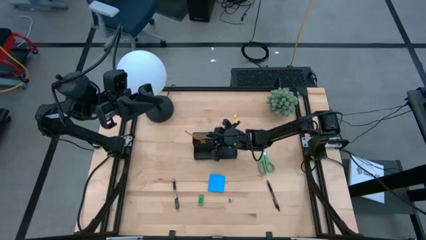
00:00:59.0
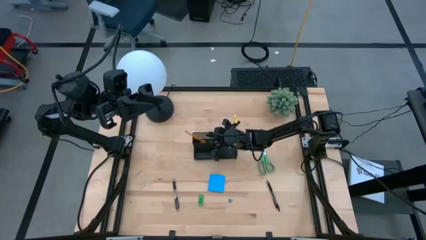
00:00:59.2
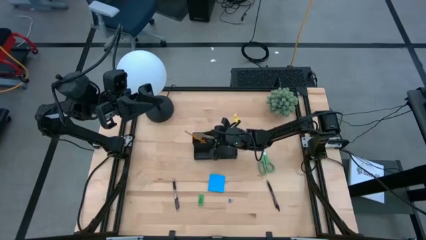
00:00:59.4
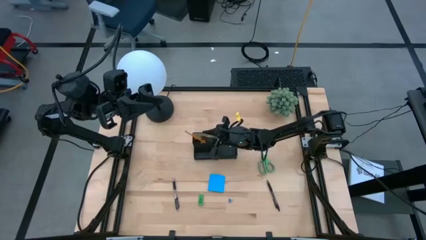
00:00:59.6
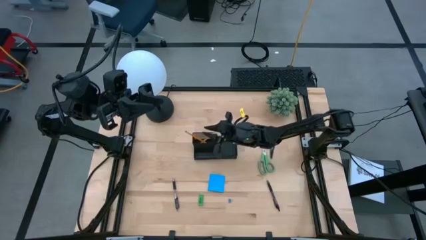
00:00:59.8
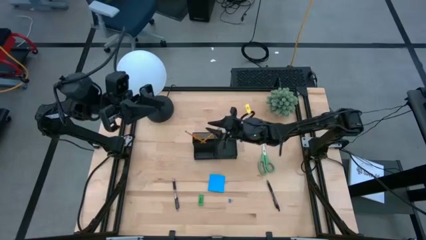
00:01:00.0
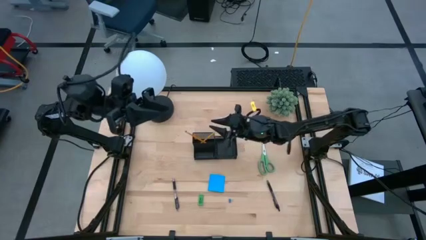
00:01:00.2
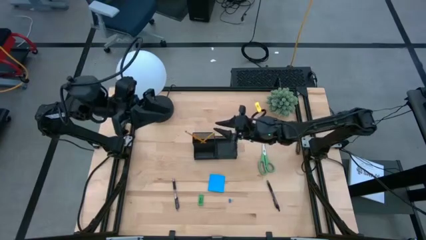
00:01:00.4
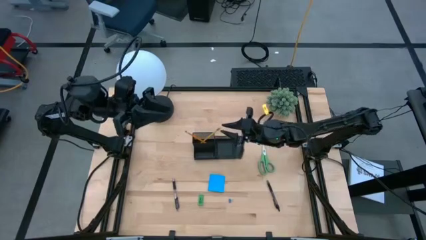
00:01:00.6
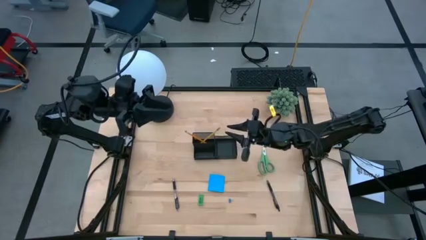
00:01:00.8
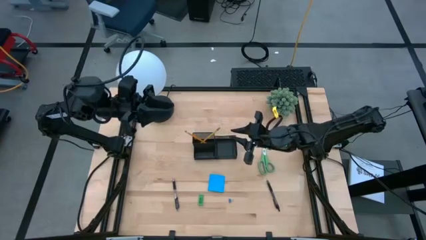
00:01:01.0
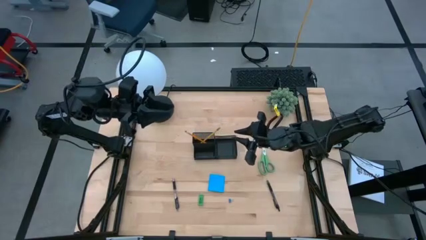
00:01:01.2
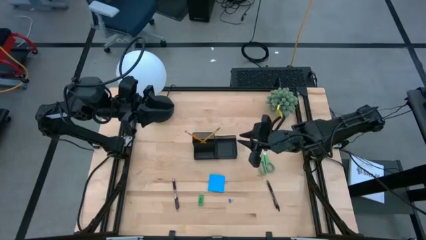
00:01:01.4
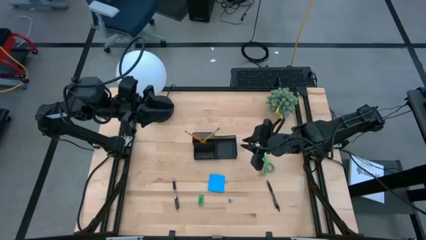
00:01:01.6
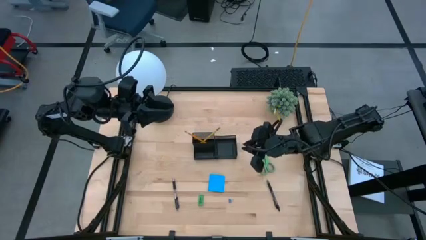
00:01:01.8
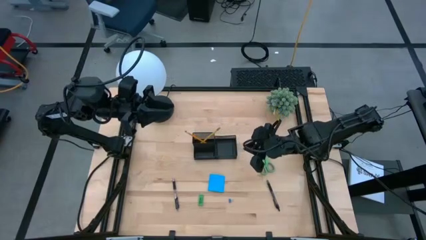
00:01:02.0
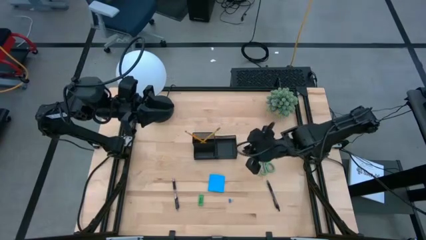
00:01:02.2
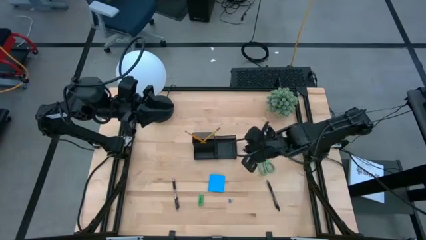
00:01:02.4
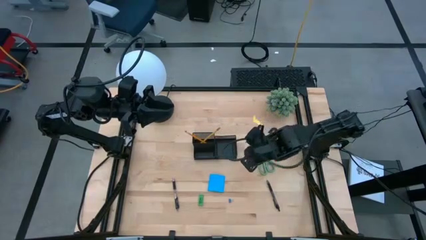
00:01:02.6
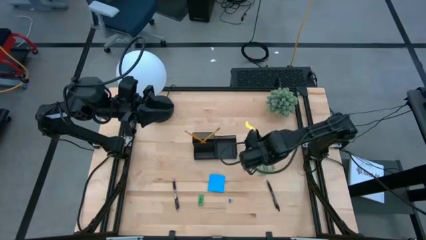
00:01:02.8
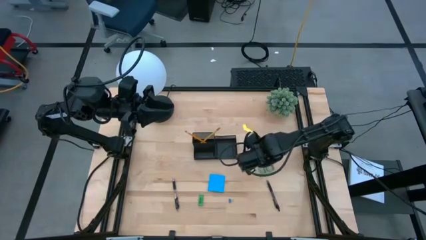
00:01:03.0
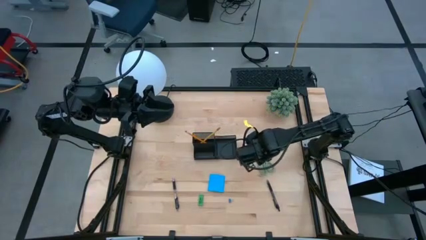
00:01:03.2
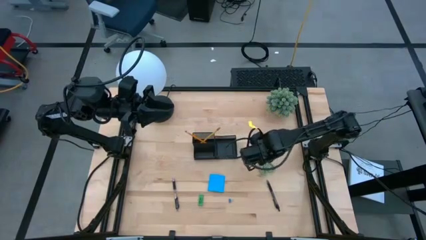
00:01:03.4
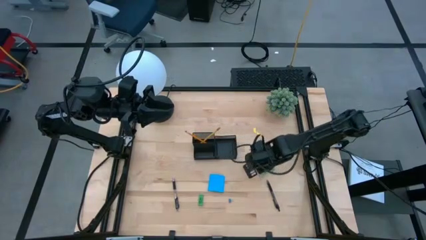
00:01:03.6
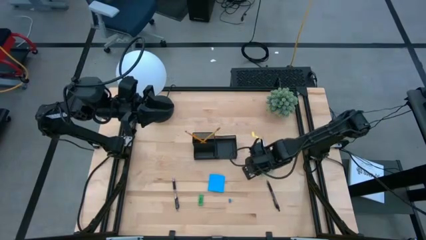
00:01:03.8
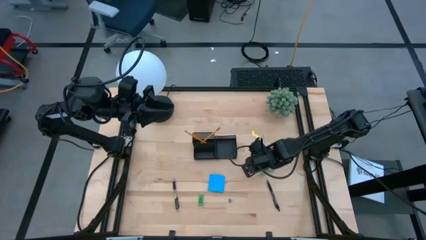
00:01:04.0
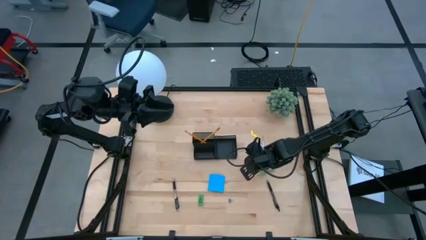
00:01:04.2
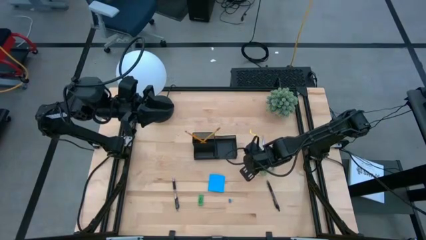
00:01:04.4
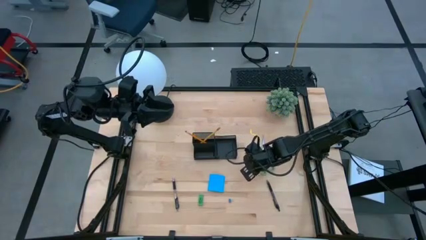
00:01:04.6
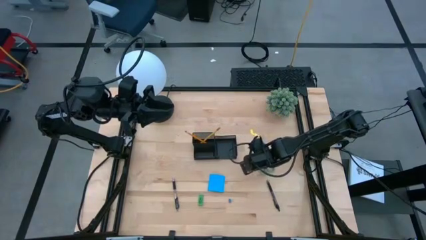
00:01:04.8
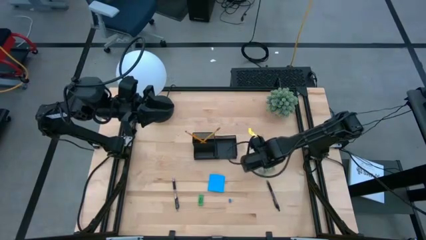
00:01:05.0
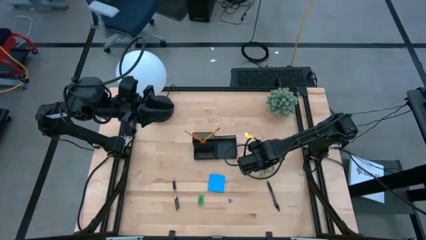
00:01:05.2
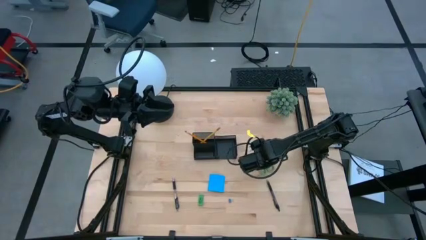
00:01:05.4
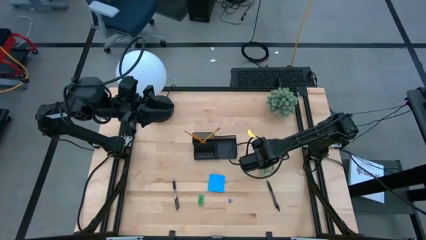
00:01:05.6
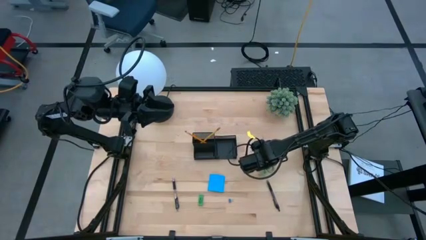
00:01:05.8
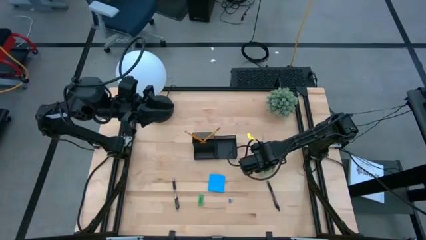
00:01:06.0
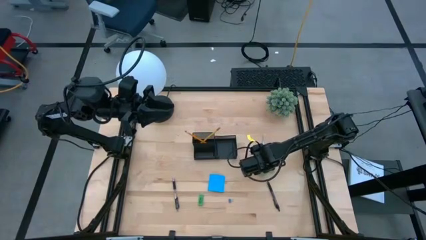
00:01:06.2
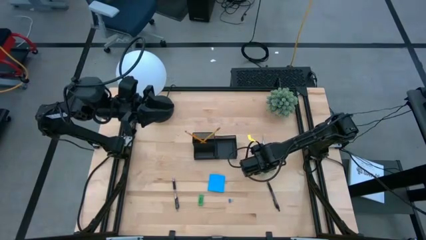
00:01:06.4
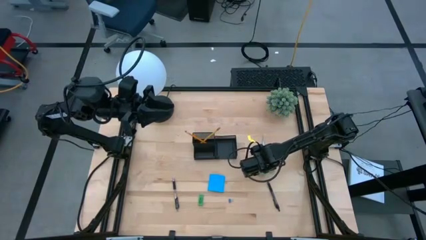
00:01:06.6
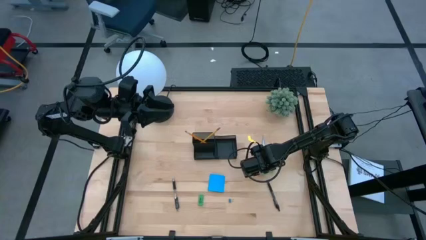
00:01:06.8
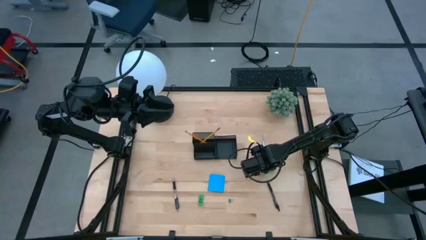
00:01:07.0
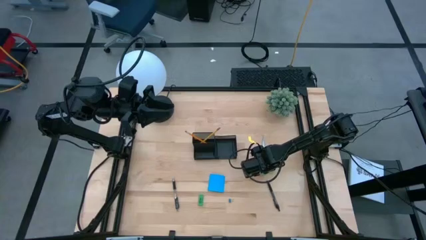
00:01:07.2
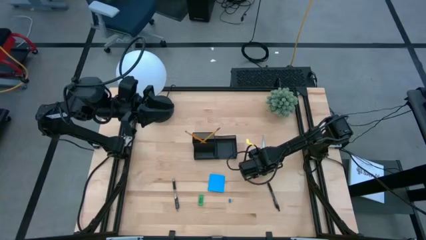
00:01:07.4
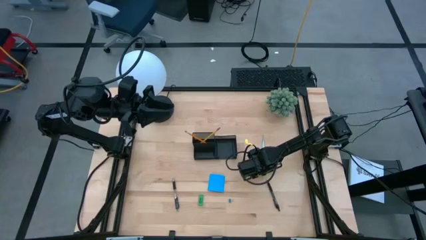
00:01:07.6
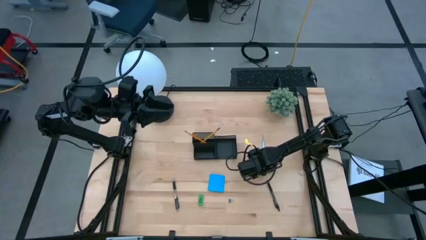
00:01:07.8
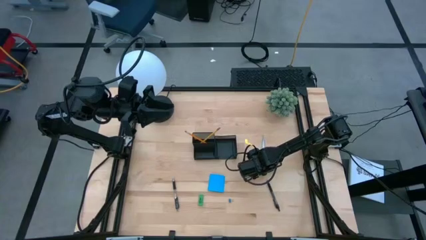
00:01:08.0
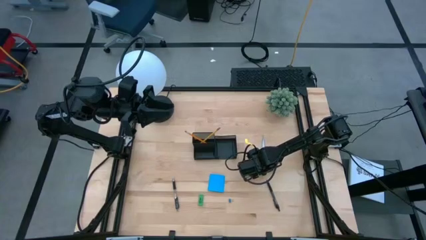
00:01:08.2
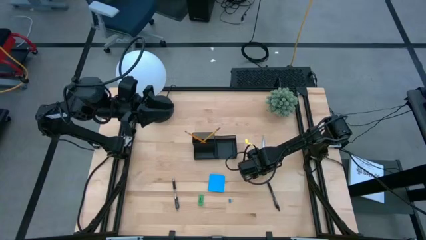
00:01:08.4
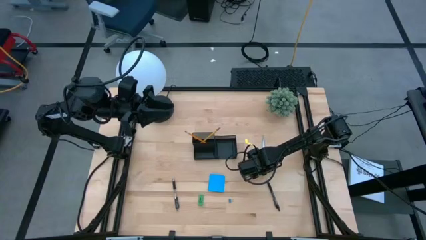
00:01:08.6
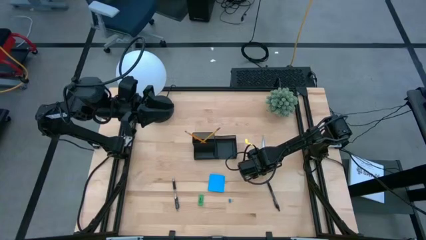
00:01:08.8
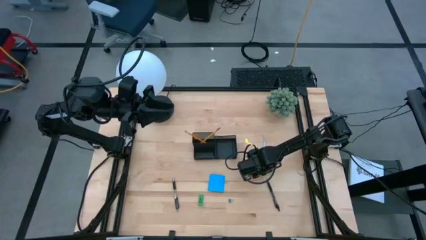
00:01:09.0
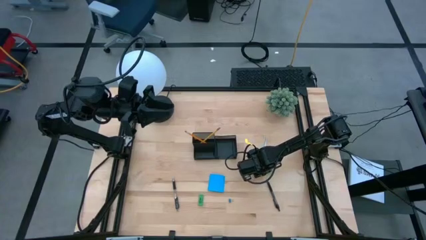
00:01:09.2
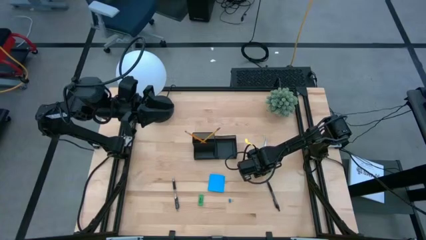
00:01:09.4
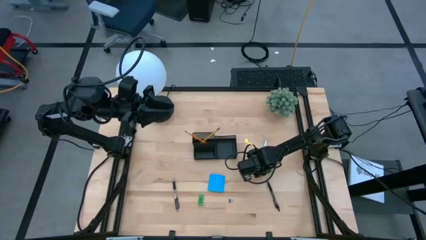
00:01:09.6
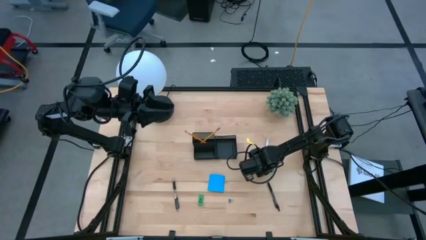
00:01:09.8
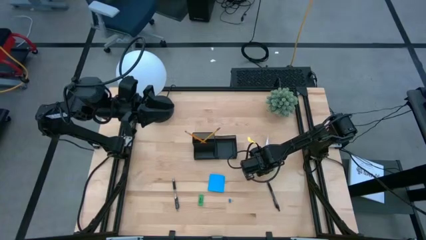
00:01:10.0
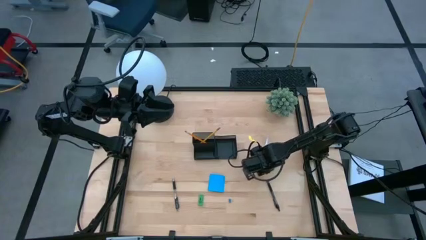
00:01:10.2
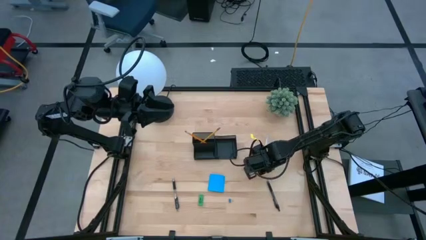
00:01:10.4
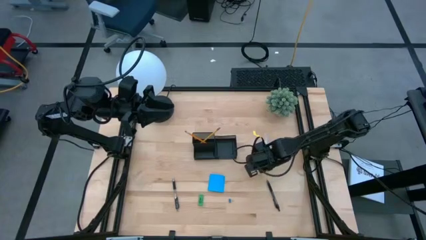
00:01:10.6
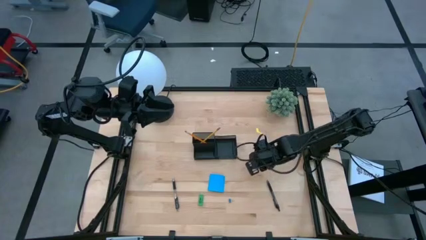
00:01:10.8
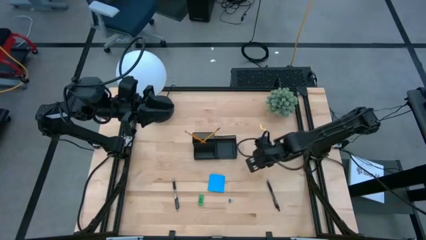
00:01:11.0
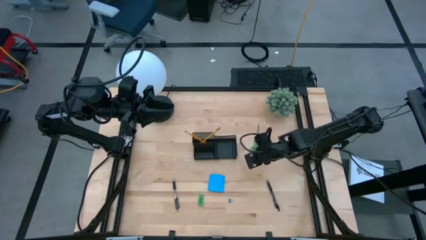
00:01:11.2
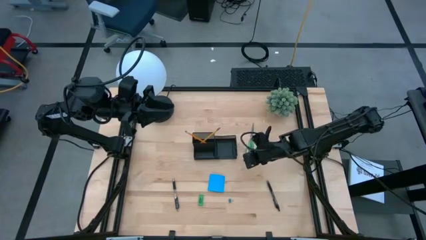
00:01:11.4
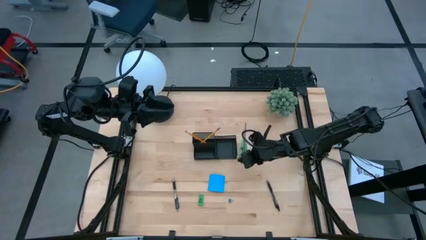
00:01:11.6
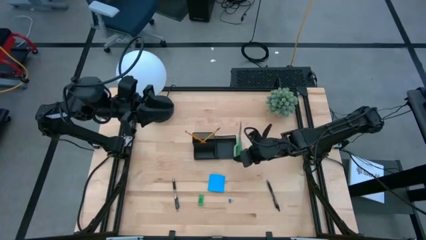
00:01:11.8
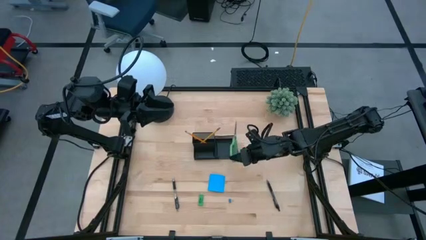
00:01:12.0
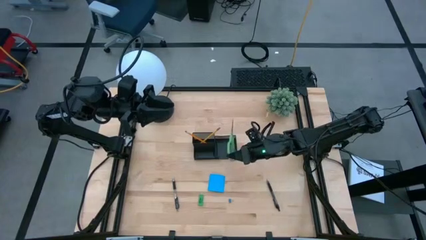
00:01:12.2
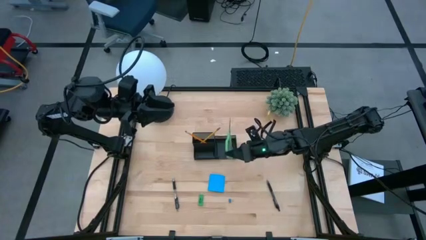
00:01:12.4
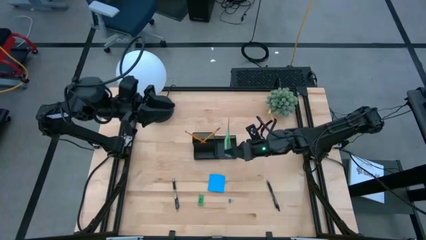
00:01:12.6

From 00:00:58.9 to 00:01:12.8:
Task: Pick and place office supplies into organizer
Put the green scissor into the black desk organizer
